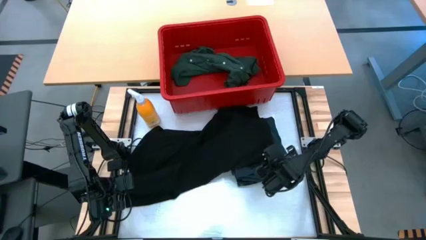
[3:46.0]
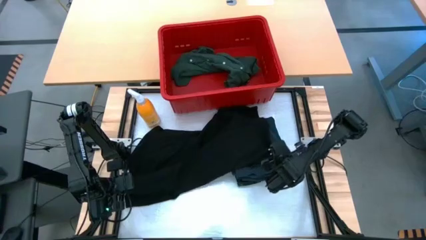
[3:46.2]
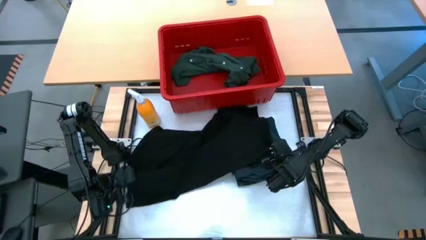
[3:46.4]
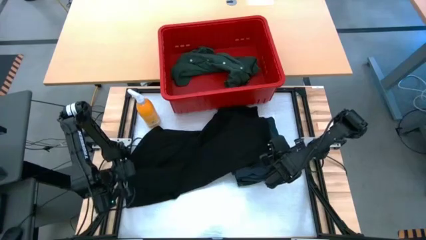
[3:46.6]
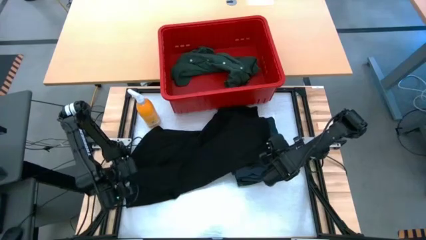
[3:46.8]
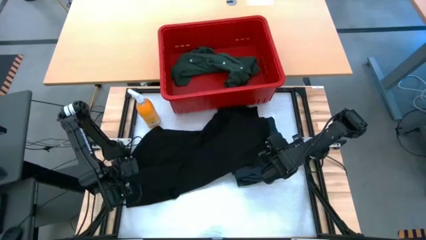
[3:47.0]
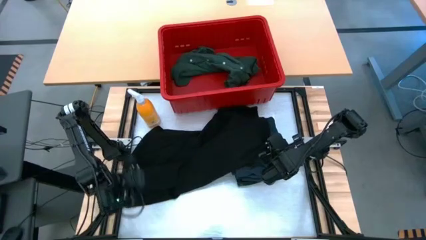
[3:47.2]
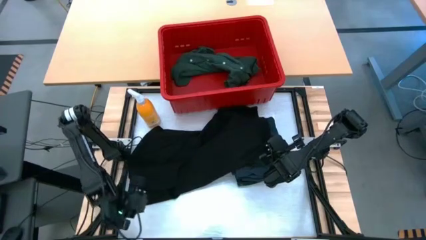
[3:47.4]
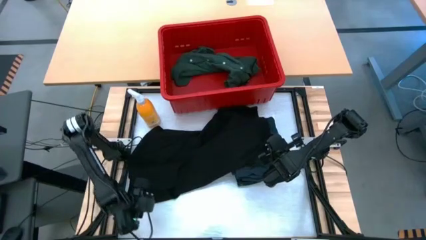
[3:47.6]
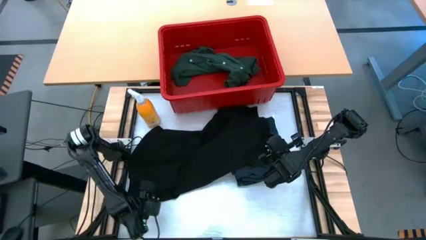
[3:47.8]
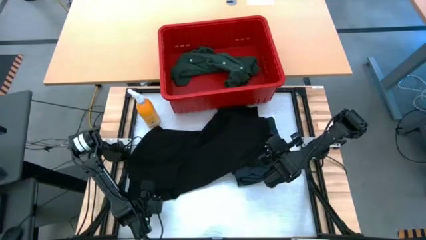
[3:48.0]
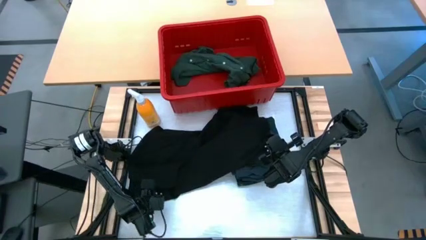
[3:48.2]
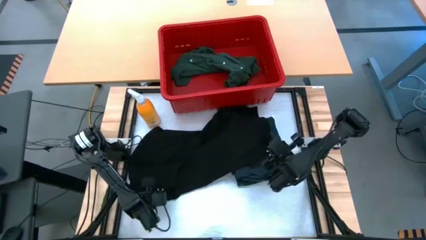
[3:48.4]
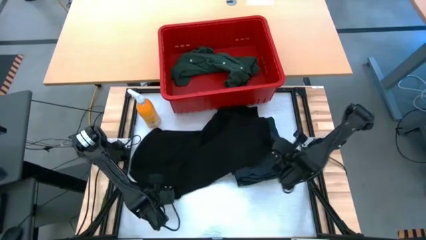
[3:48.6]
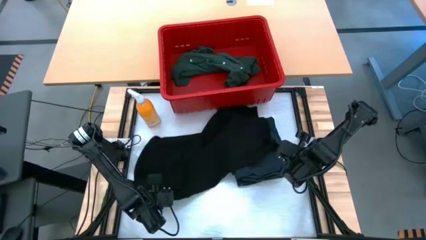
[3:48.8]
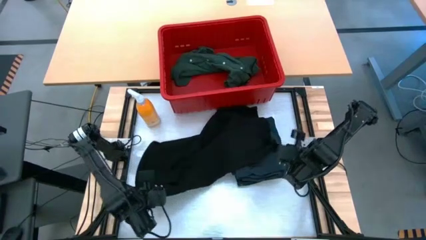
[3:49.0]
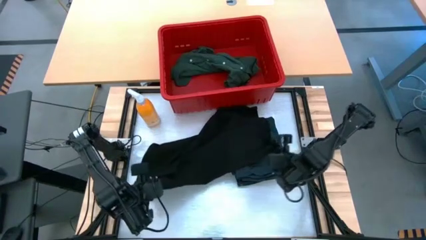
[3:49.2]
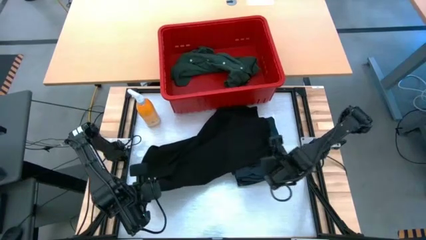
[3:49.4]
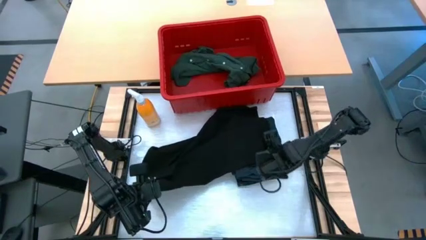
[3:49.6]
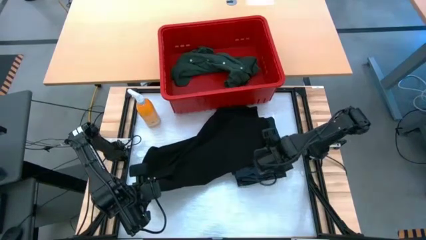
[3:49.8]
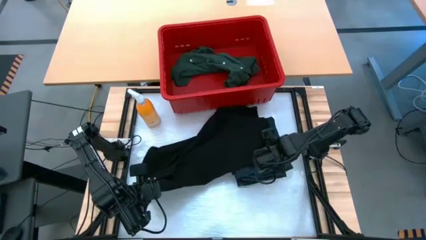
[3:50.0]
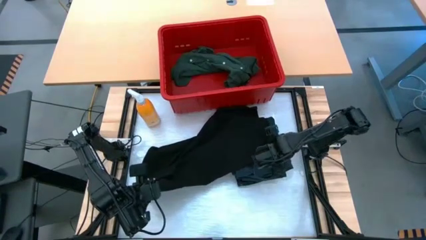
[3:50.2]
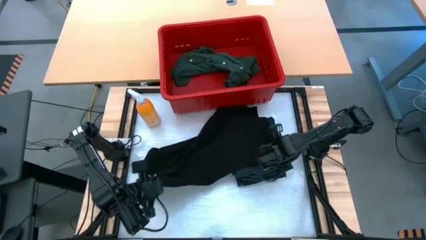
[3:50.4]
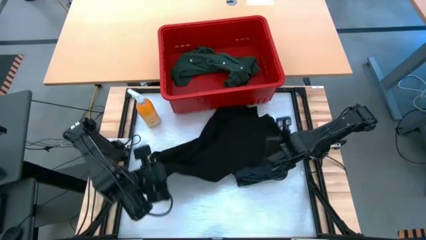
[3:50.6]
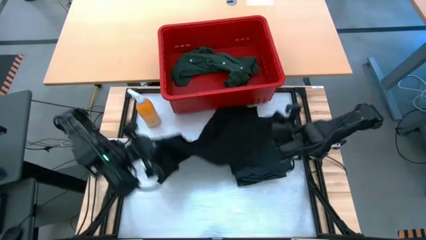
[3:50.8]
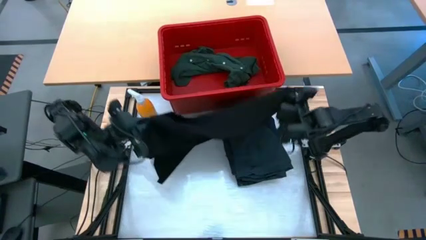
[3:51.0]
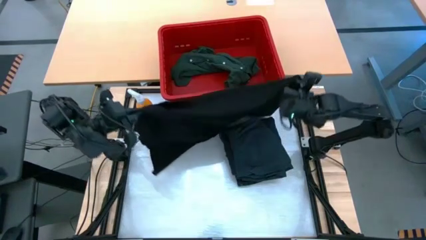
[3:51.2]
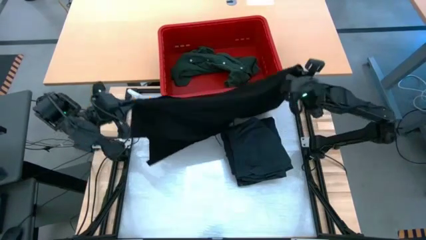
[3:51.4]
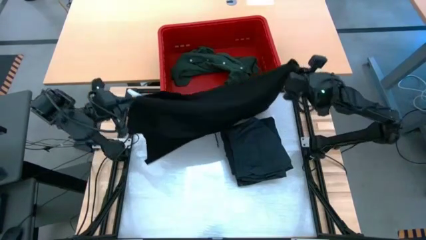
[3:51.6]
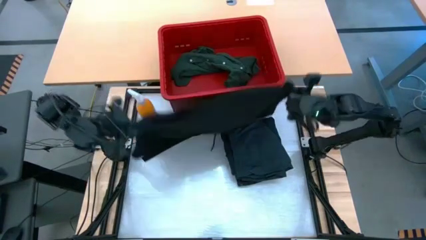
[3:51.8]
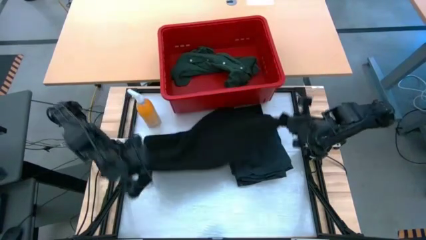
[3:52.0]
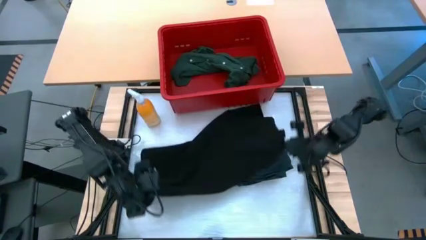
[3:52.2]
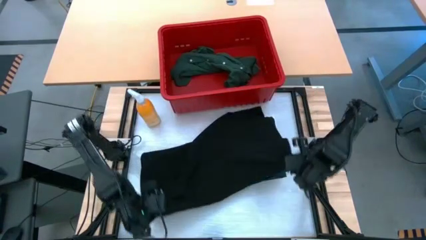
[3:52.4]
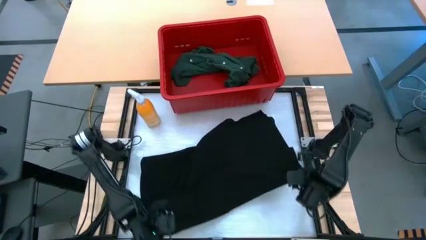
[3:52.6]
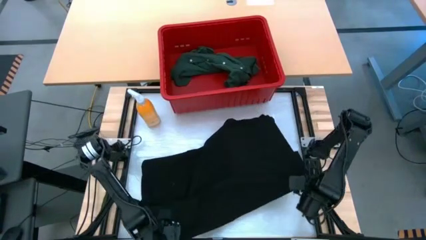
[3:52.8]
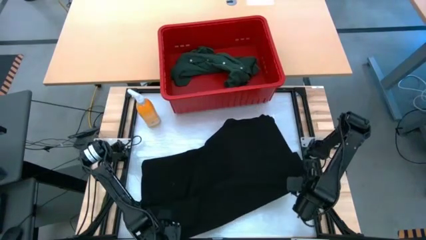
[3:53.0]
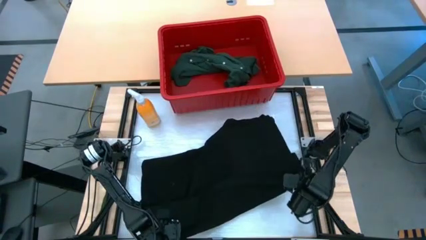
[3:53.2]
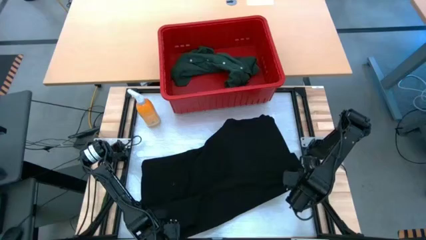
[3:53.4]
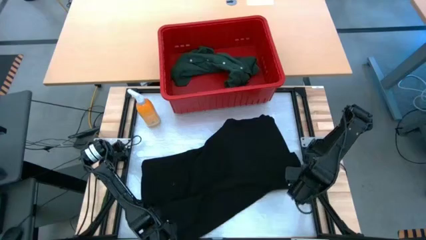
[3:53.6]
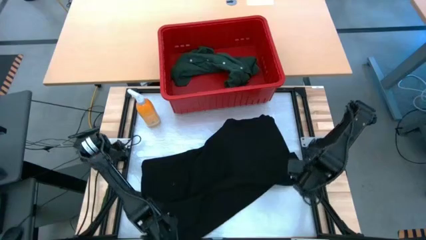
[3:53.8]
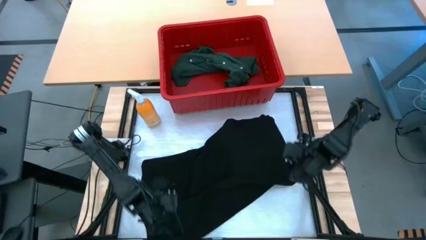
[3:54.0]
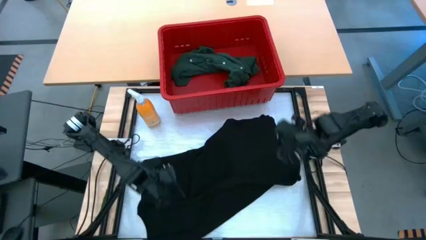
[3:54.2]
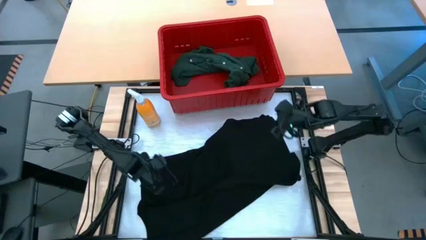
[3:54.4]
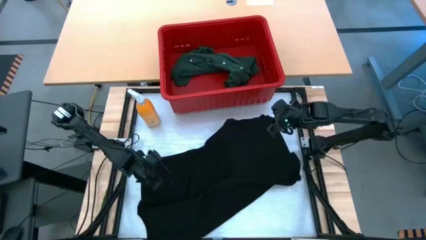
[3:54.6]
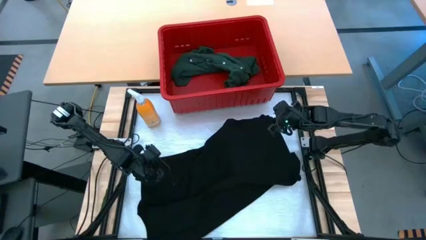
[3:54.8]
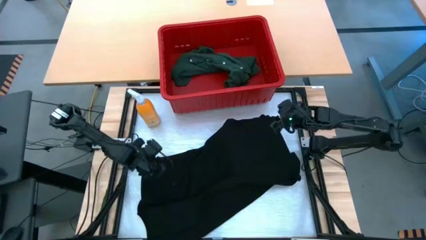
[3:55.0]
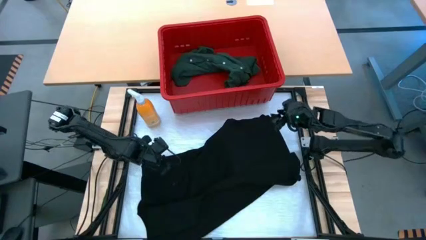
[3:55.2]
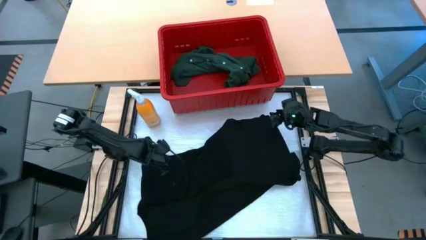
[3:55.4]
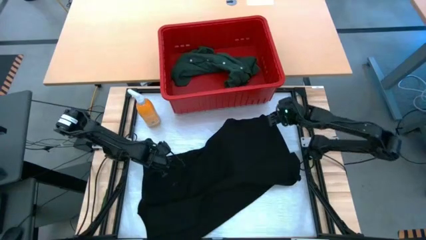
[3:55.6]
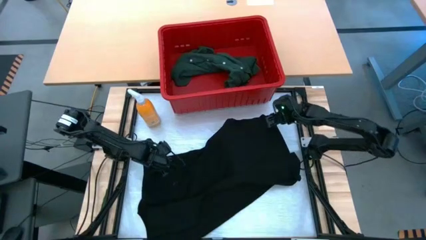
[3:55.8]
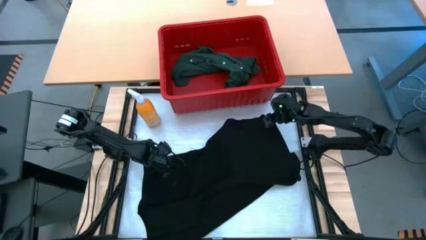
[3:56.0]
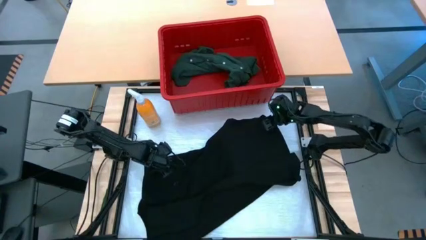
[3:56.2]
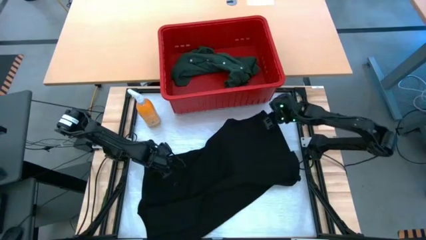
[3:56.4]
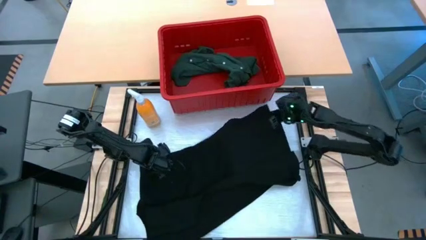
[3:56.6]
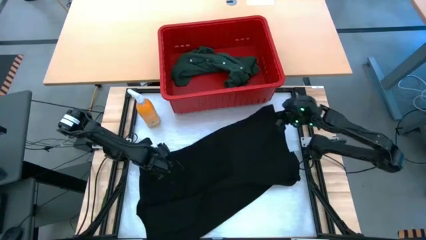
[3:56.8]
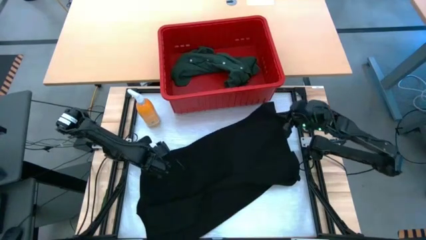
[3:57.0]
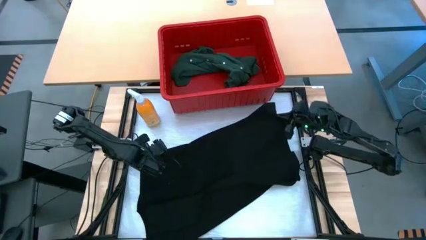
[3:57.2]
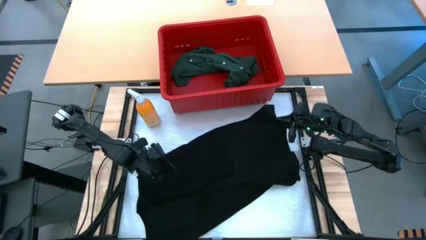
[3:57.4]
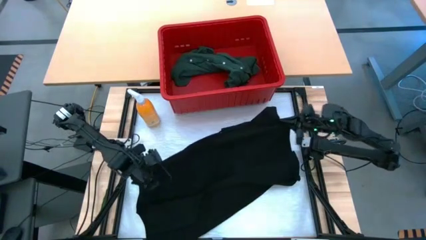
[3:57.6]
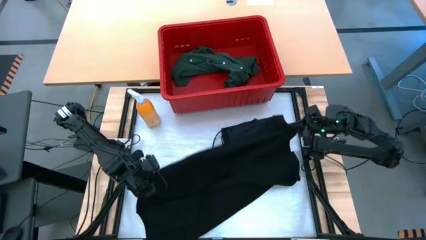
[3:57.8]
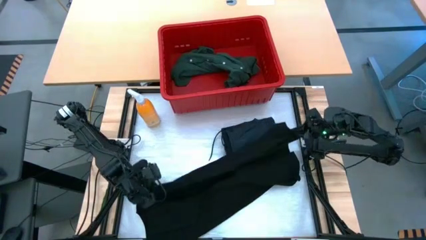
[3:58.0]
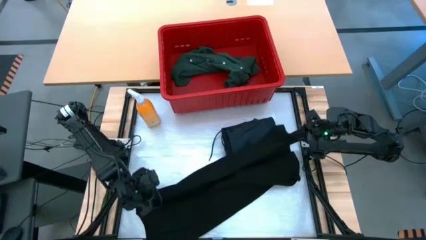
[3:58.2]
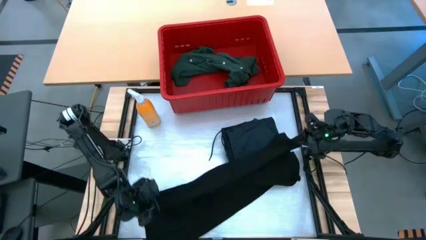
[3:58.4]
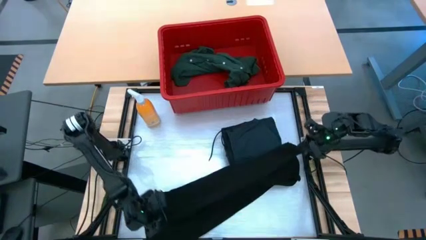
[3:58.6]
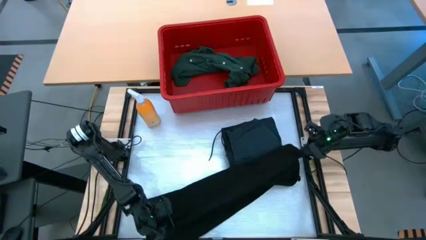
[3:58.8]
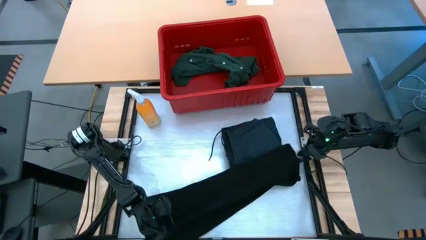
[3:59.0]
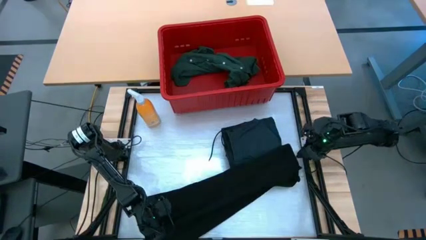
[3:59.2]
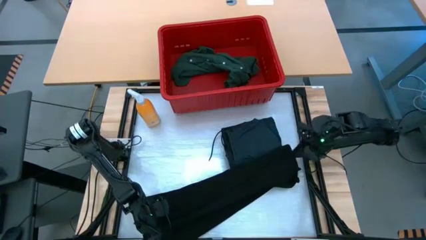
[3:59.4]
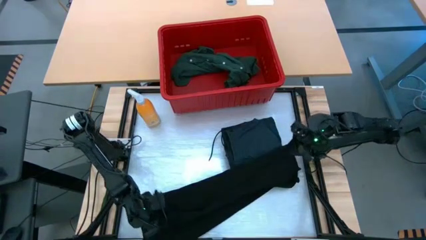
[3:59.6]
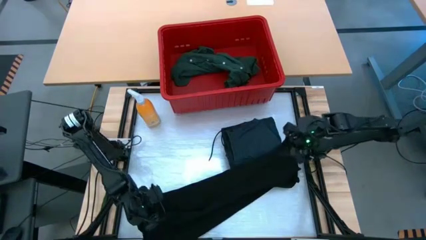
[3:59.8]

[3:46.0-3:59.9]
Task: Fold Laundry from Bin
Fold the black shirt
